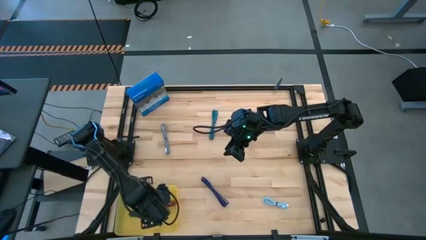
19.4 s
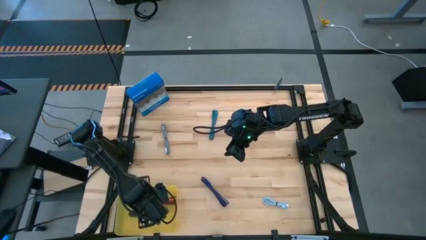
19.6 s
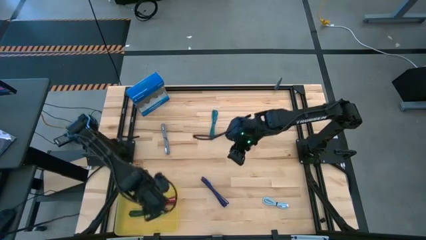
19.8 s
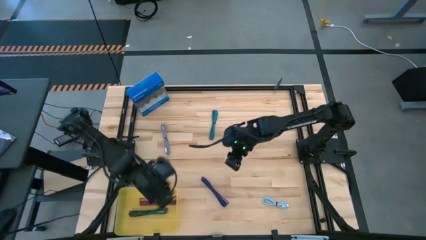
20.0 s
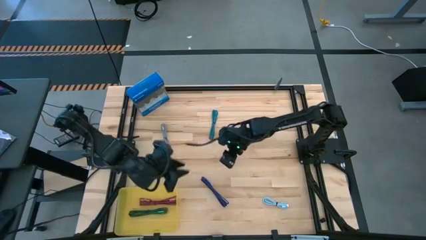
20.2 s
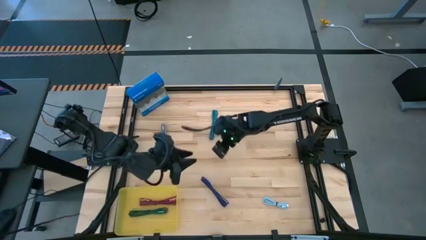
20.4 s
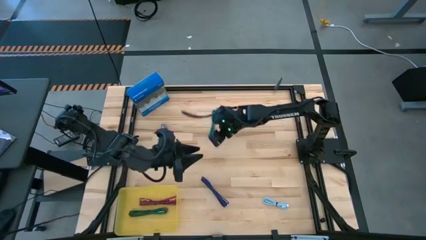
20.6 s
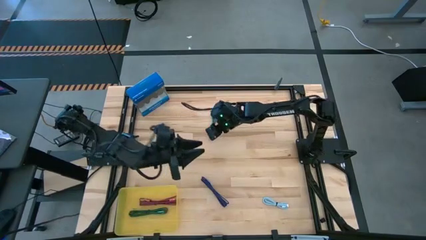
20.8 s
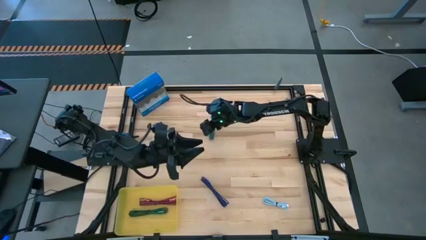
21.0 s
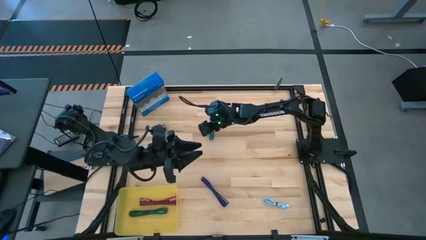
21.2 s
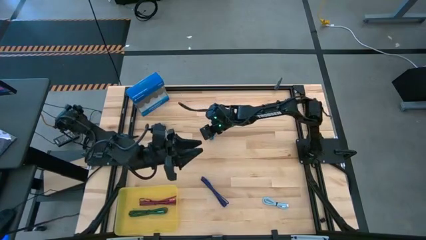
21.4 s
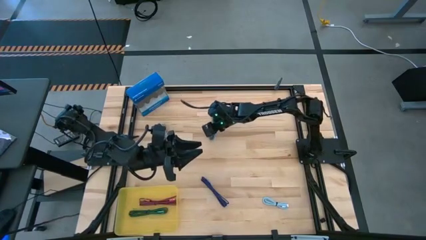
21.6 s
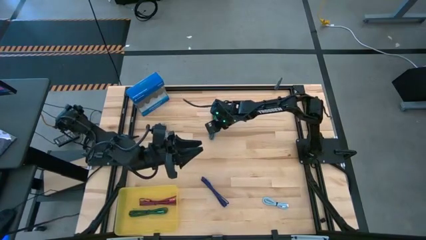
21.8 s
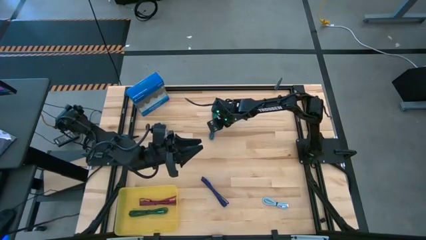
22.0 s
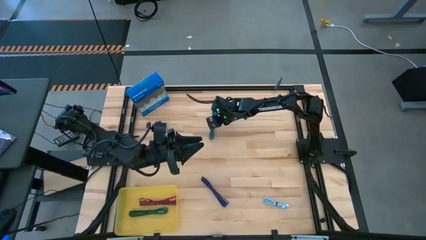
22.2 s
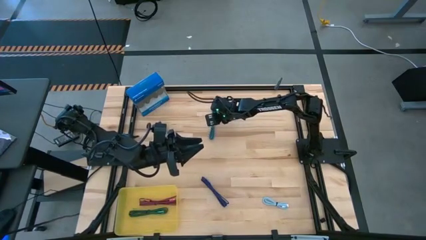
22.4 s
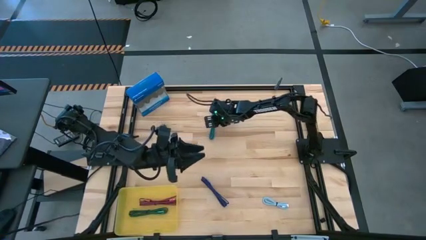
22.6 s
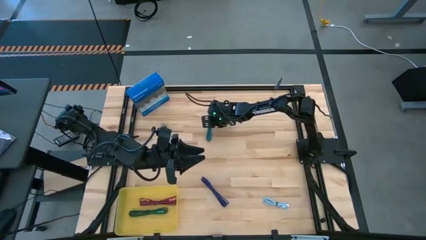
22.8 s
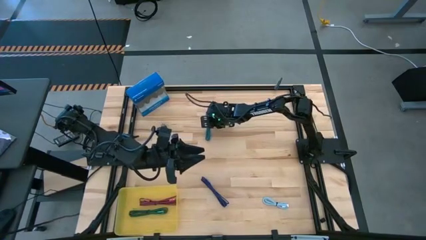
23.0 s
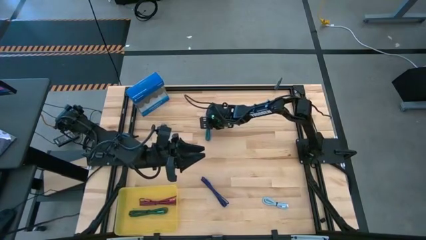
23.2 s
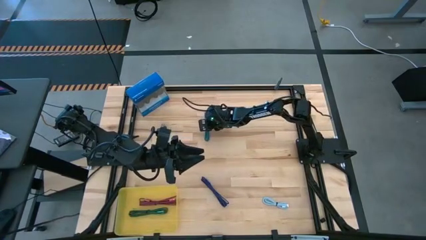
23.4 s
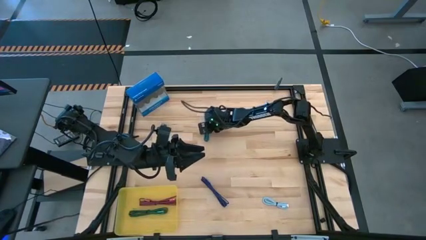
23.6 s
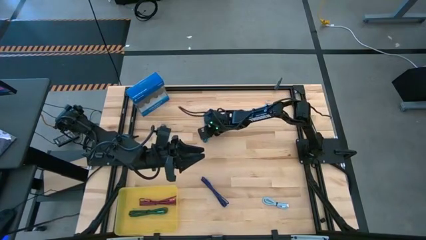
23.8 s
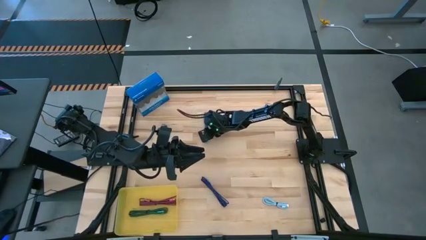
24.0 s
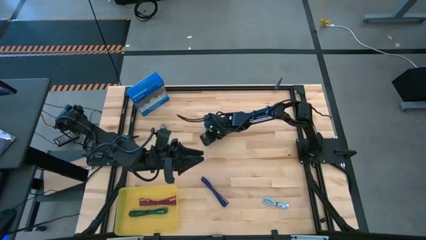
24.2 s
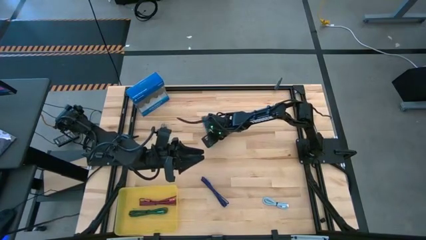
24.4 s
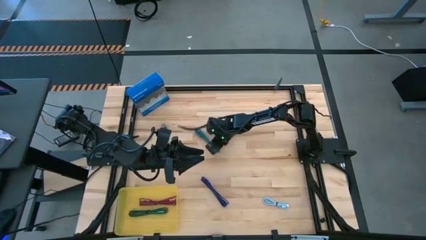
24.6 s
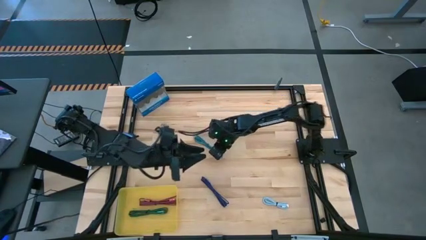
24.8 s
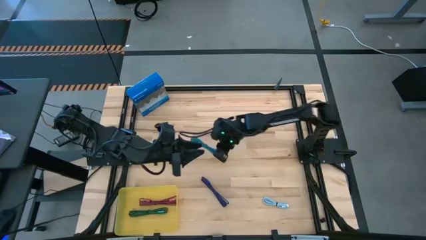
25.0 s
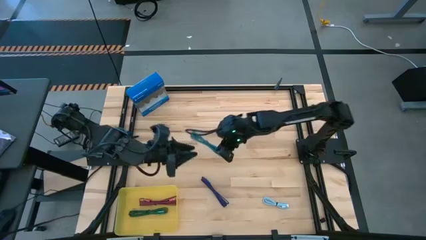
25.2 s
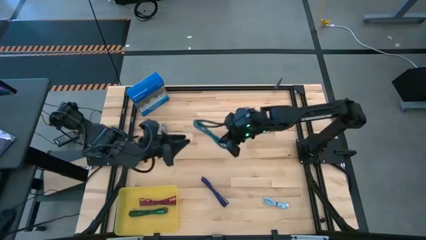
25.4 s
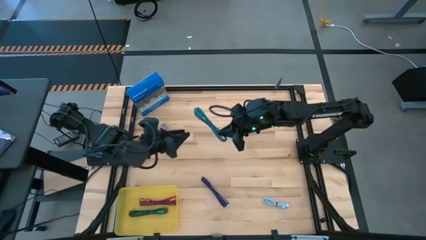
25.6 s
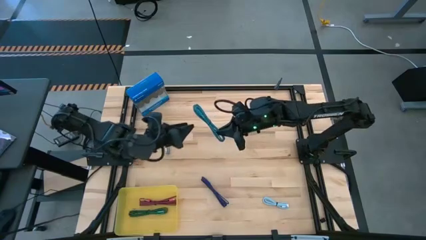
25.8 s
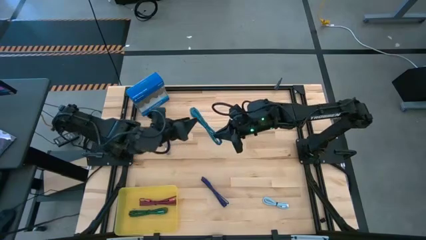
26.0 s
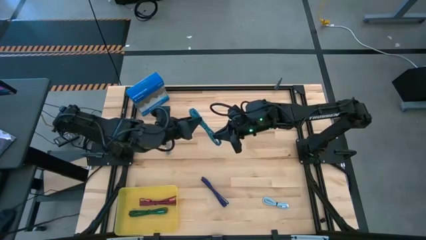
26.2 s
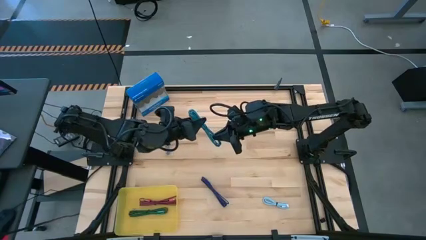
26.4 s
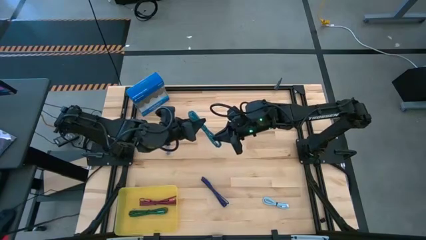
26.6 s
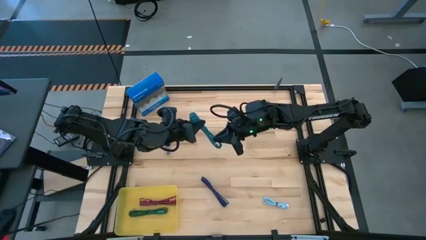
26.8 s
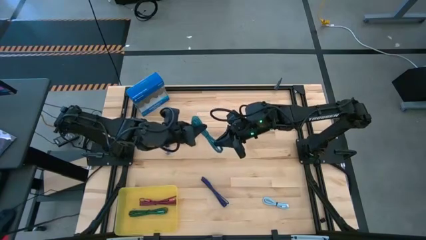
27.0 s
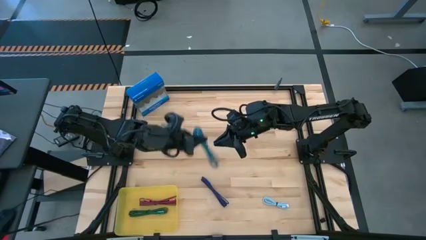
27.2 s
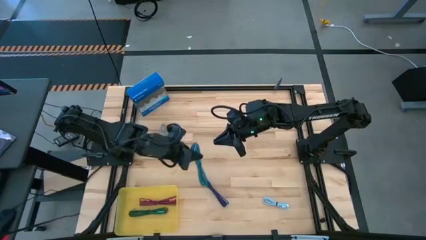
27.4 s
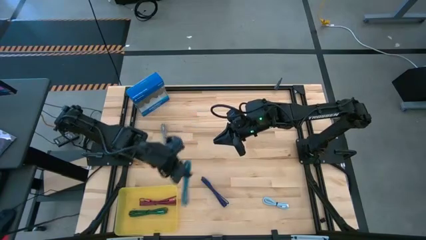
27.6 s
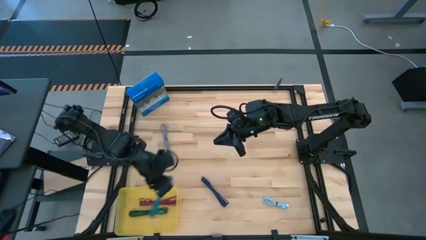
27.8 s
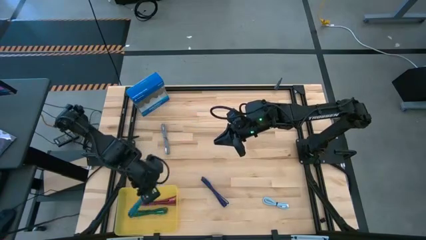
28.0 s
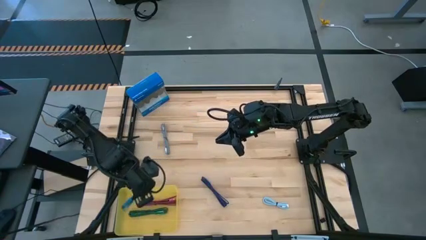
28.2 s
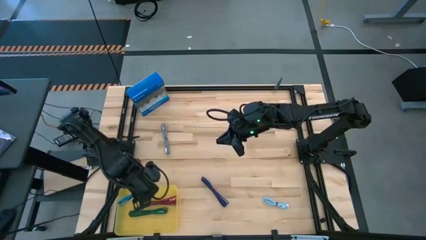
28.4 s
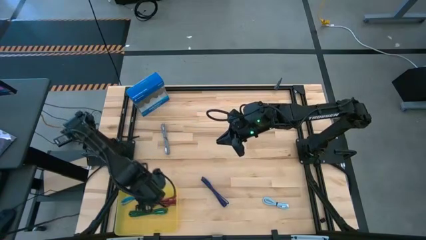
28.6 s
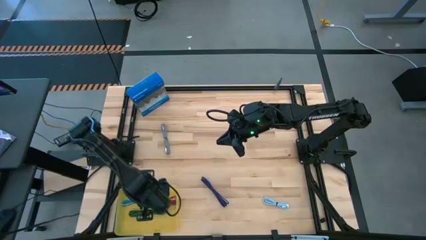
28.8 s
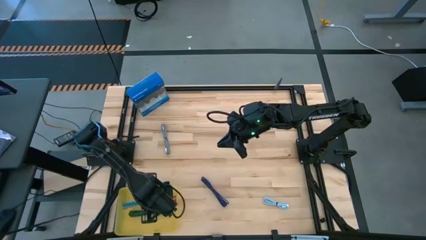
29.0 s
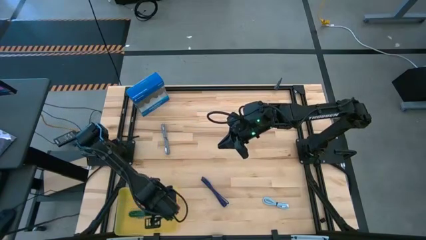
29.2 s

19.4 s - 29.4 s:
Task: Pick and place USB-C Cables
Put the blue charger cable into the yellow bin

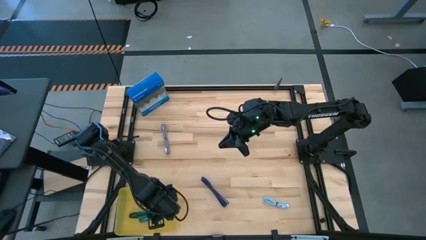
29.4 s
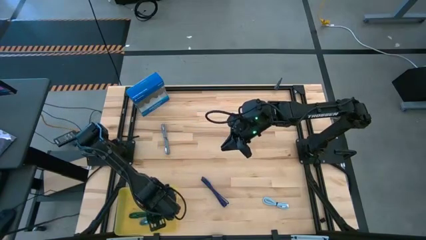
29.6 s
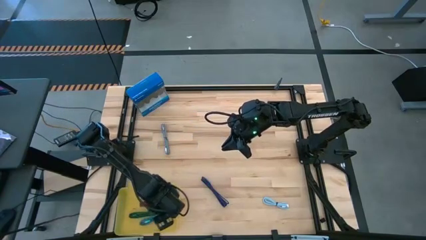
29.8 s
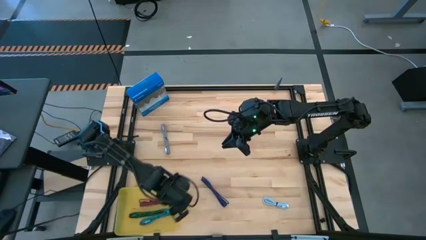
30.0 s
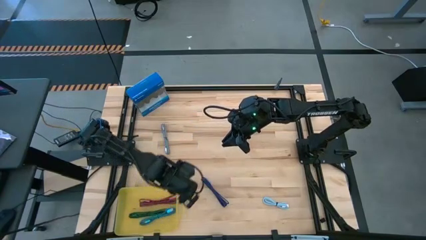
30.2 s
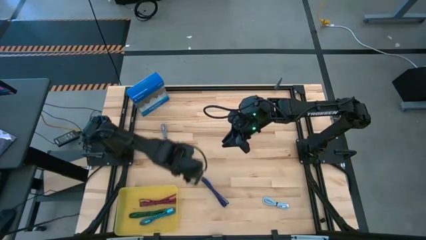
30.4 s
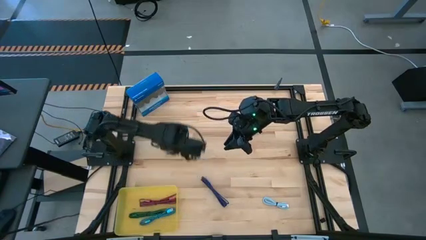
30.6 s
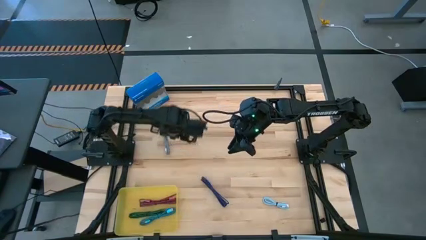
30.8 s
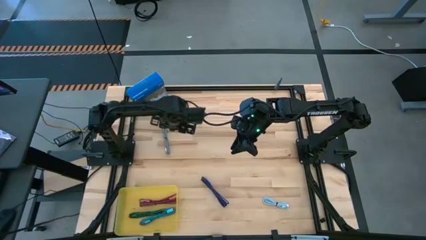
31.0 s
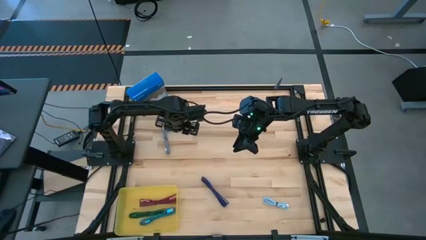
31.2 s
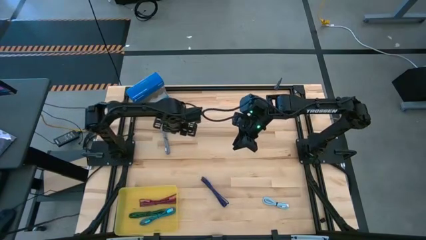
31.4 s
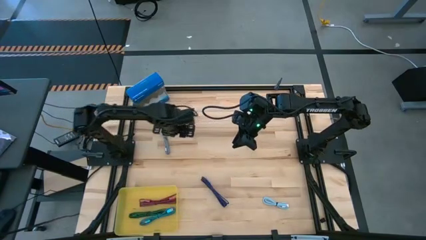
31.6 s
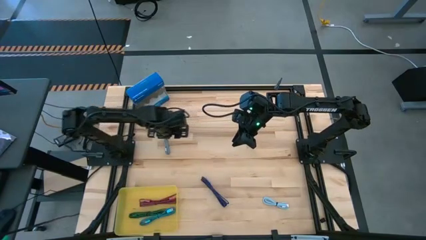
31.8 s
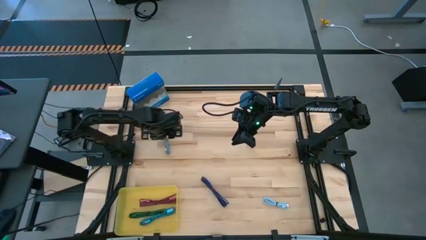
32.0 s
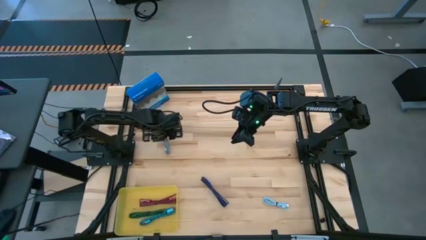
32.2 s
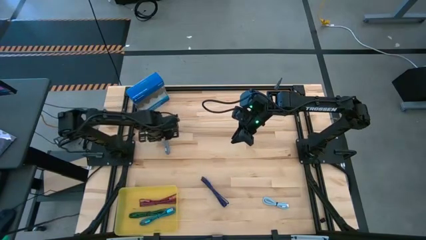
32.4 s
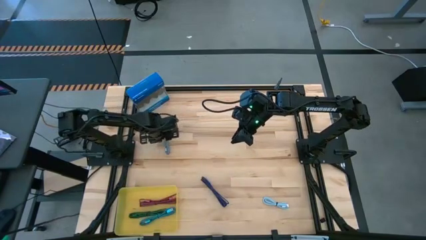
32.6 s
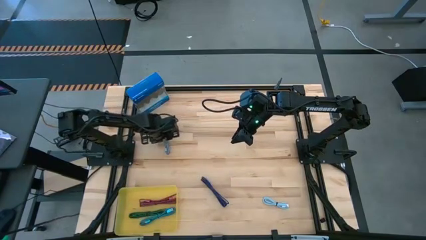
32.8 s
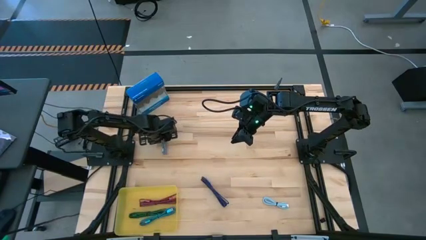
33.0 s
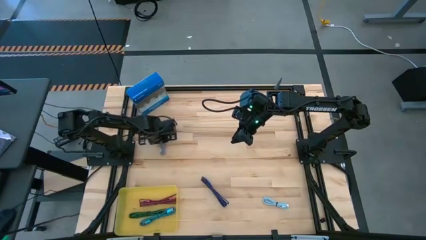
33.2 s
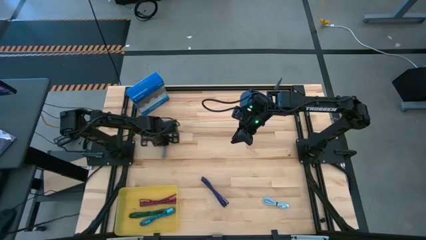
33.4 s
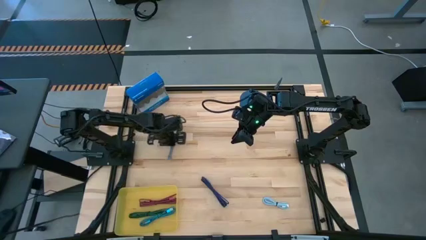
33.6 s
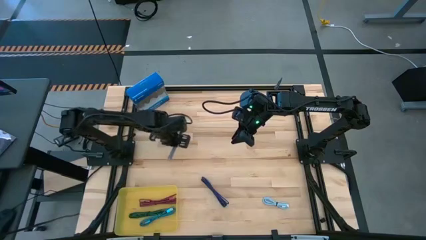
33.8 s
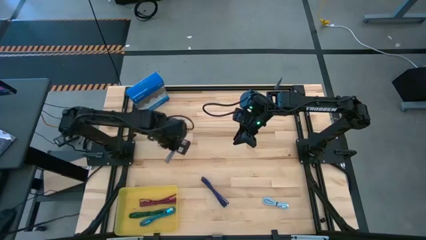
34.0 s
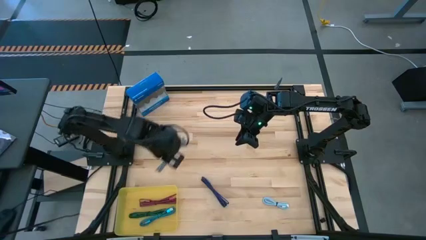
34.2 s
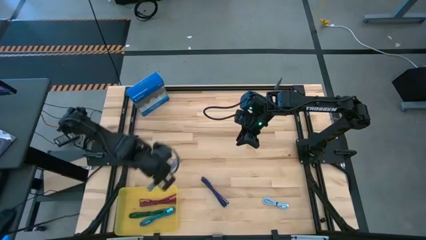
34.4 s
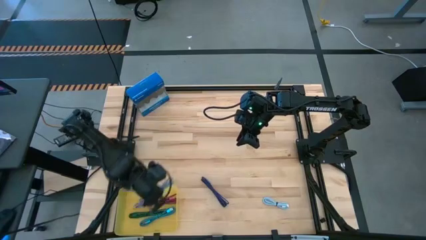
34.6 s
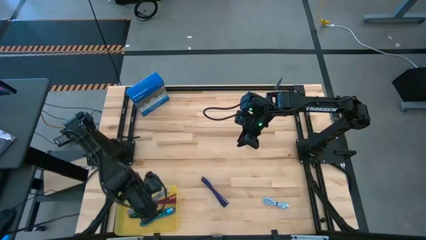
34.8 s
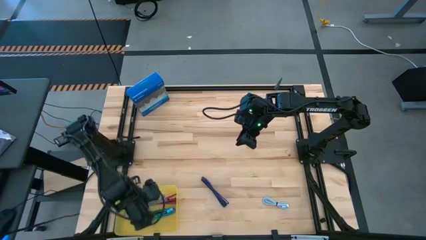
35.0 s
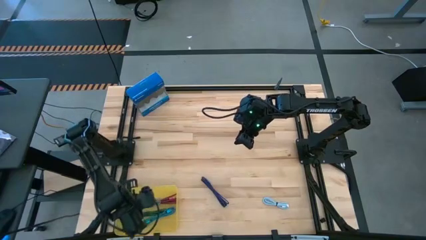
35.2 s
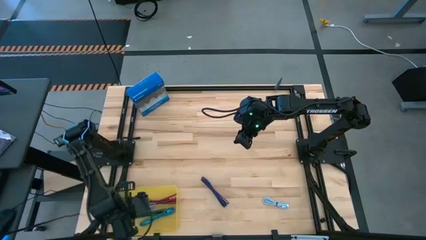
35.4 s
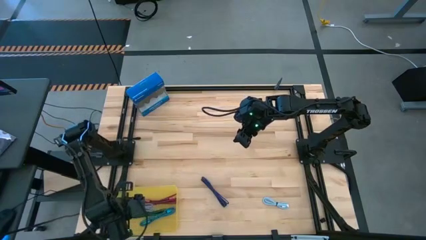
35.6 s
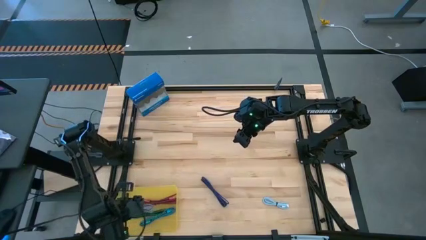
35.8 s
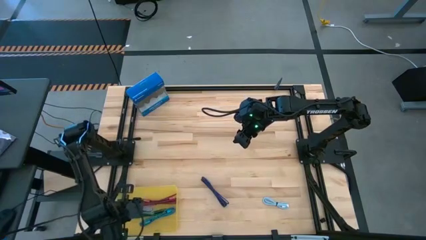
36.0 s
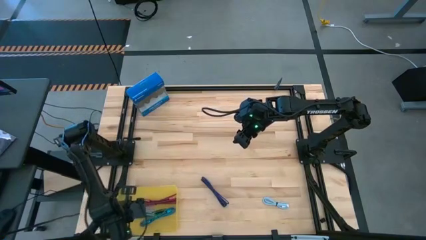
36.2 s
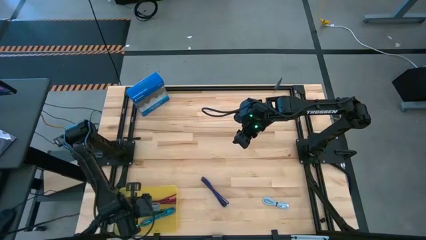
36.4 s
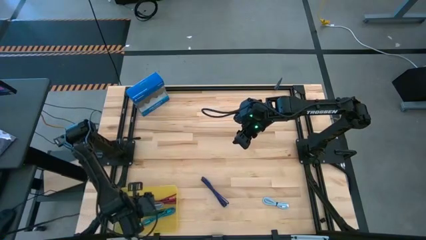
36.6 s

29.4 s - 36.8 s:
Put the white charger cable into the yellow bin
